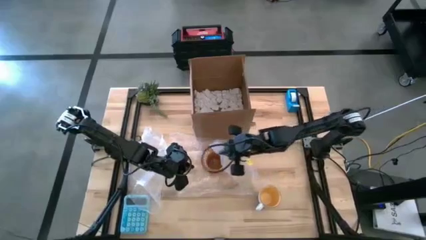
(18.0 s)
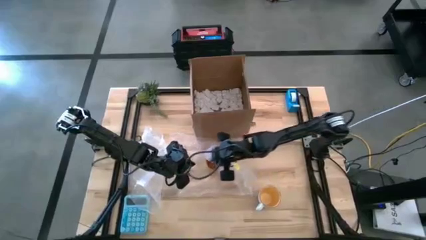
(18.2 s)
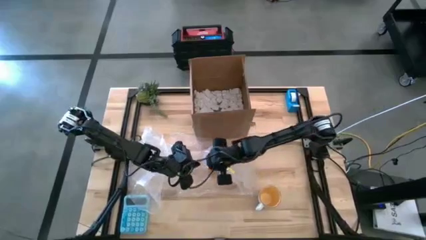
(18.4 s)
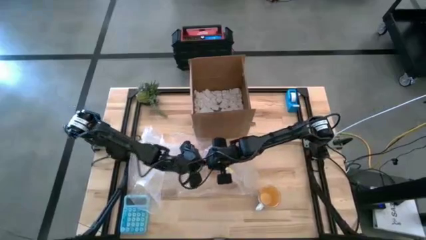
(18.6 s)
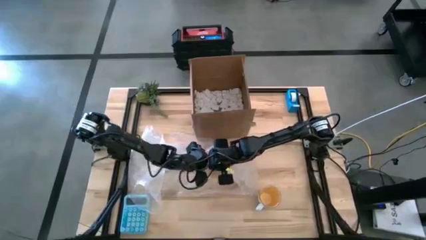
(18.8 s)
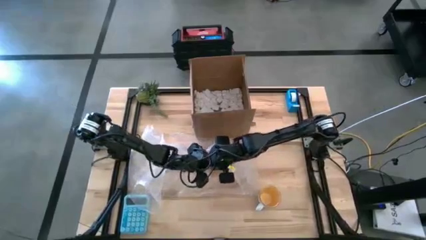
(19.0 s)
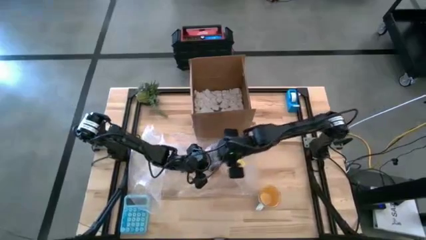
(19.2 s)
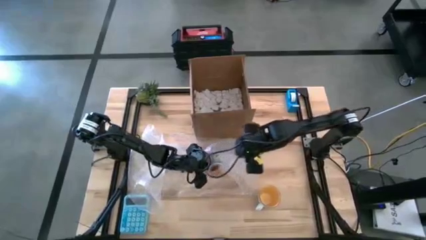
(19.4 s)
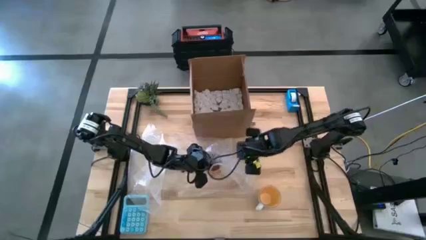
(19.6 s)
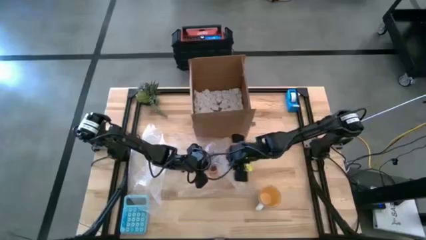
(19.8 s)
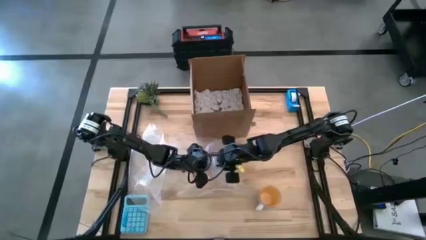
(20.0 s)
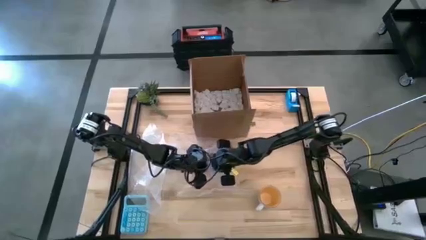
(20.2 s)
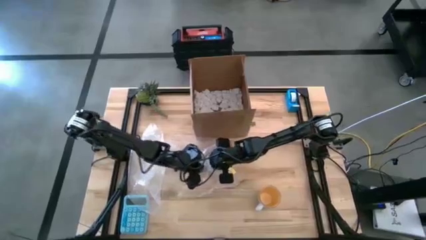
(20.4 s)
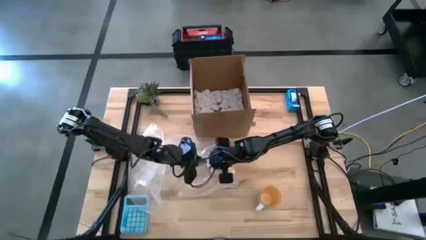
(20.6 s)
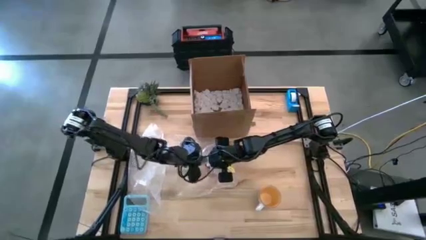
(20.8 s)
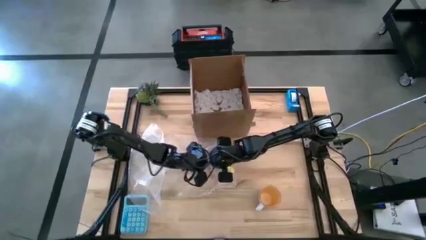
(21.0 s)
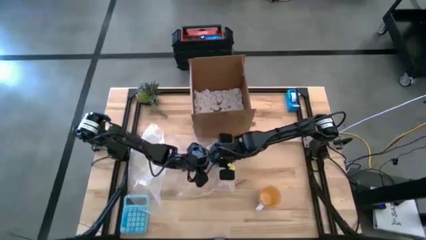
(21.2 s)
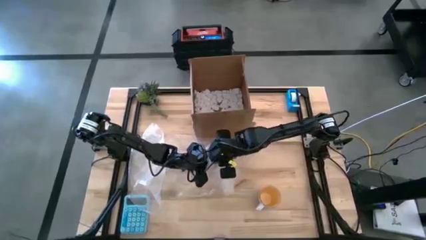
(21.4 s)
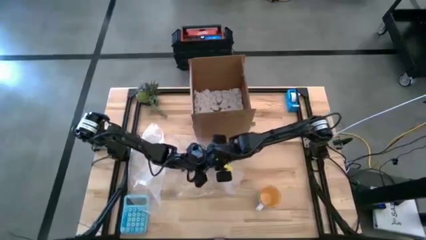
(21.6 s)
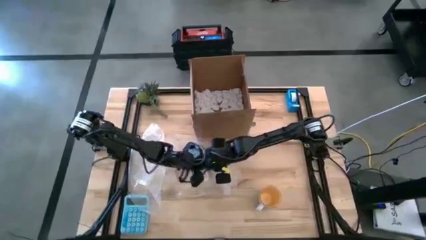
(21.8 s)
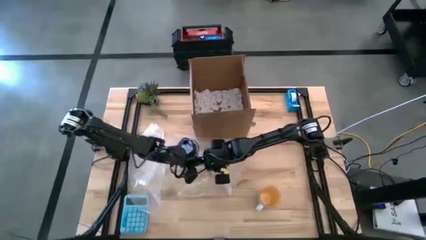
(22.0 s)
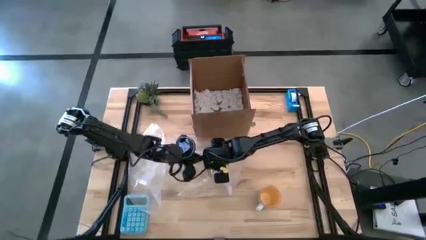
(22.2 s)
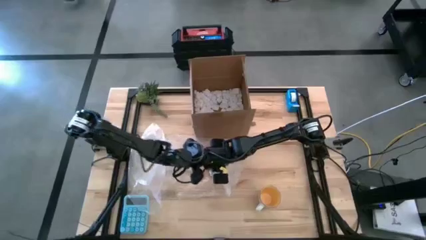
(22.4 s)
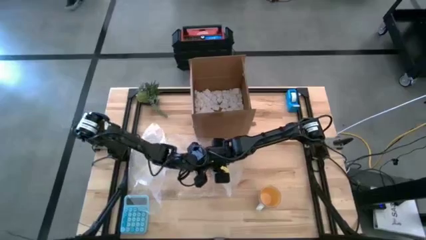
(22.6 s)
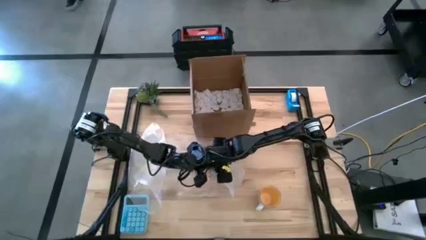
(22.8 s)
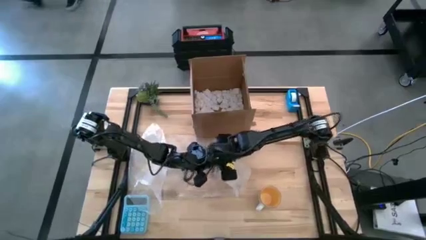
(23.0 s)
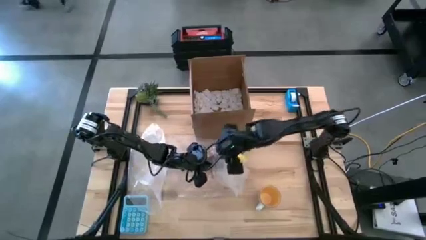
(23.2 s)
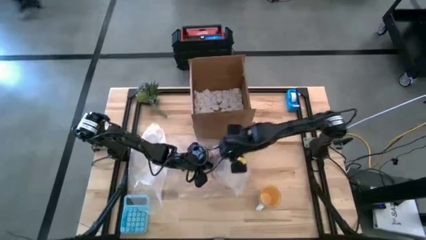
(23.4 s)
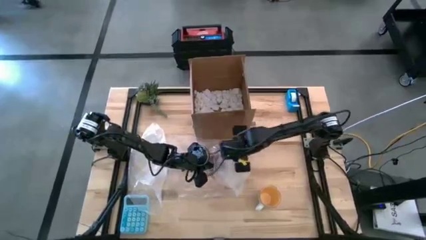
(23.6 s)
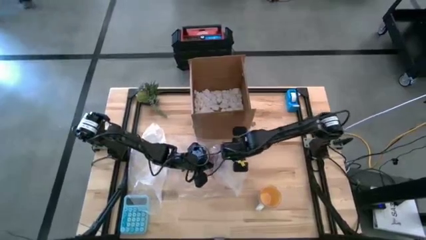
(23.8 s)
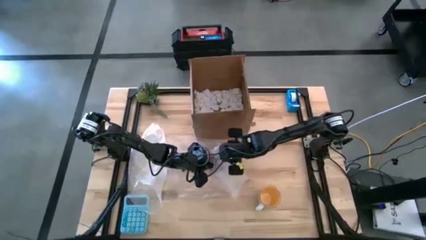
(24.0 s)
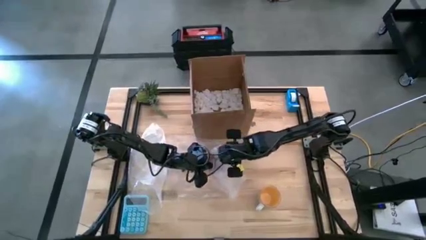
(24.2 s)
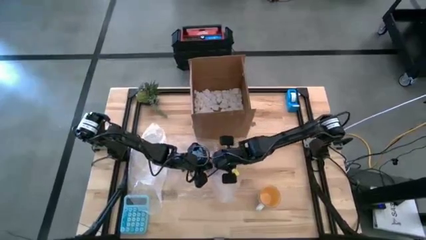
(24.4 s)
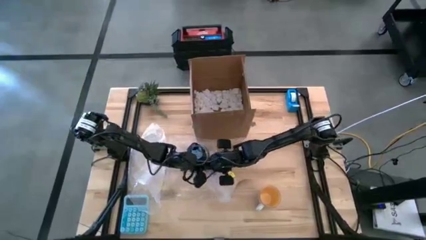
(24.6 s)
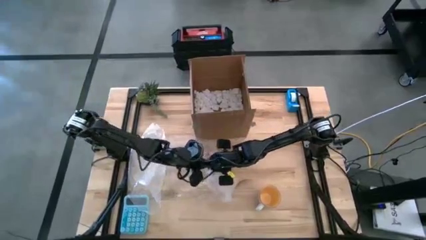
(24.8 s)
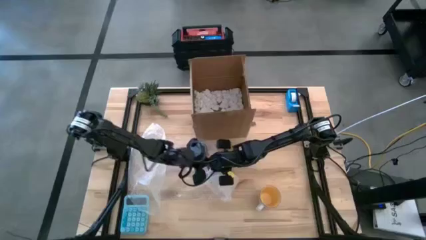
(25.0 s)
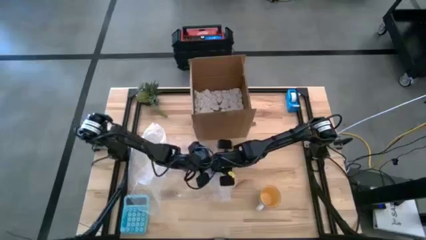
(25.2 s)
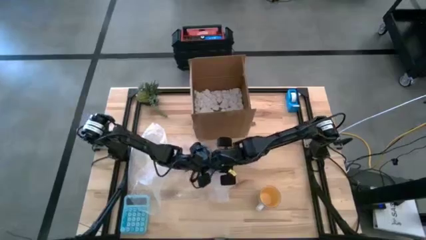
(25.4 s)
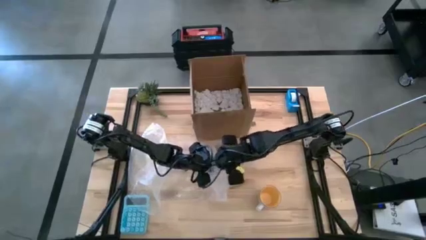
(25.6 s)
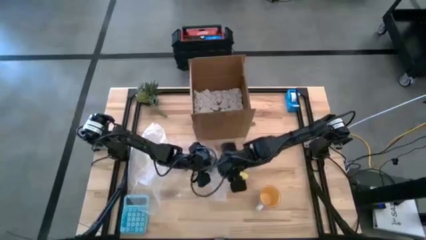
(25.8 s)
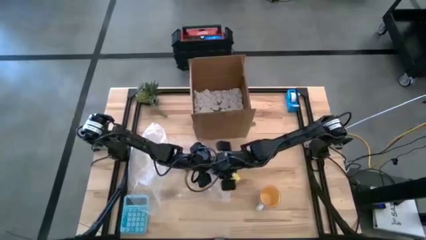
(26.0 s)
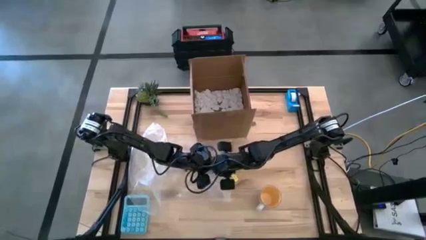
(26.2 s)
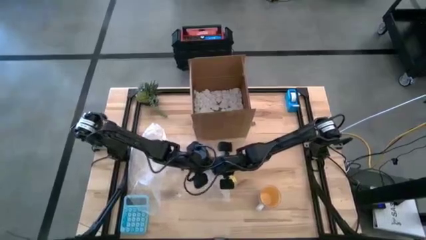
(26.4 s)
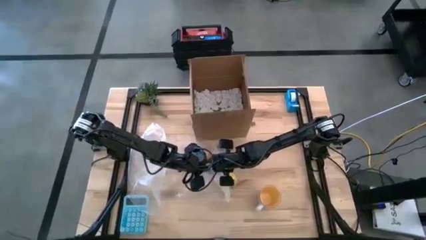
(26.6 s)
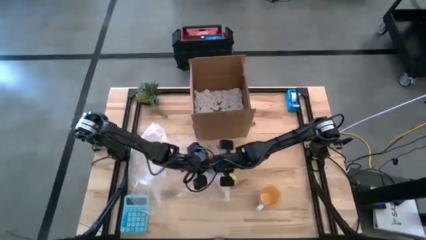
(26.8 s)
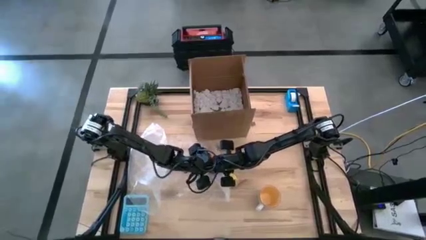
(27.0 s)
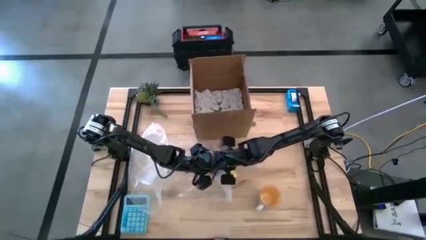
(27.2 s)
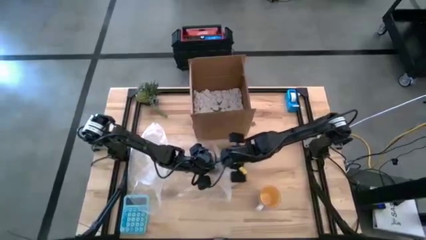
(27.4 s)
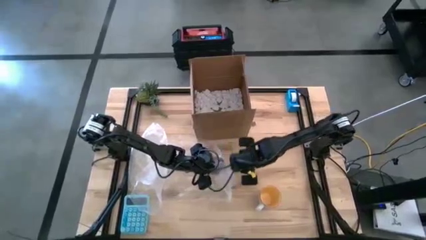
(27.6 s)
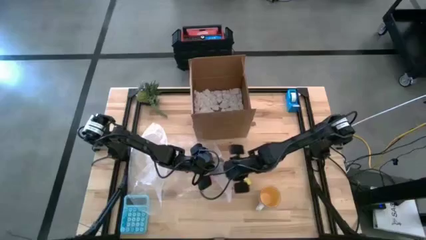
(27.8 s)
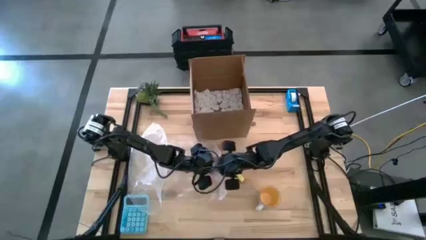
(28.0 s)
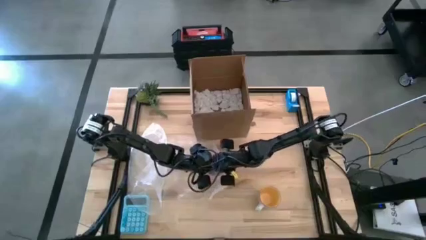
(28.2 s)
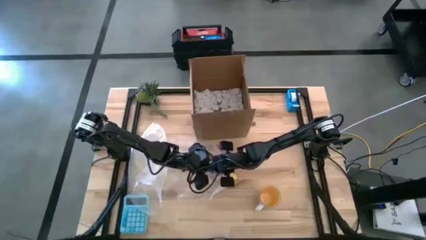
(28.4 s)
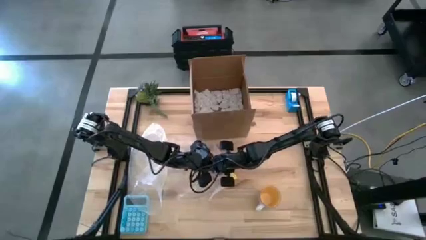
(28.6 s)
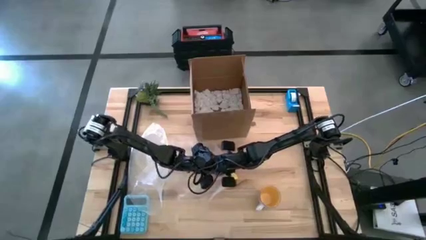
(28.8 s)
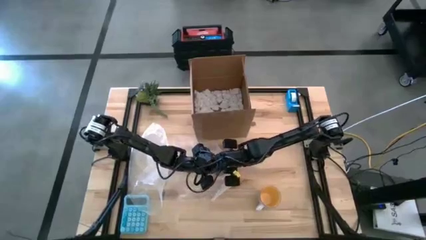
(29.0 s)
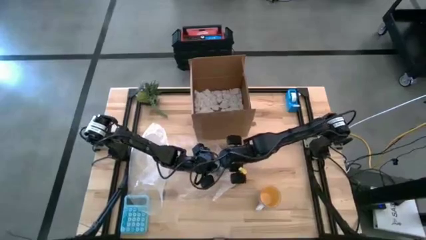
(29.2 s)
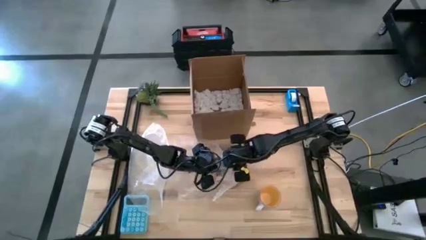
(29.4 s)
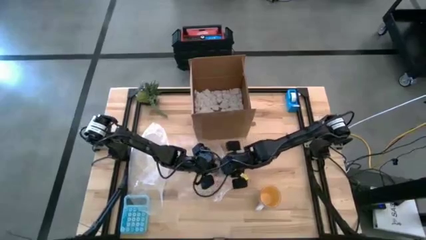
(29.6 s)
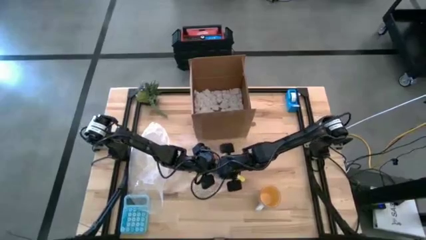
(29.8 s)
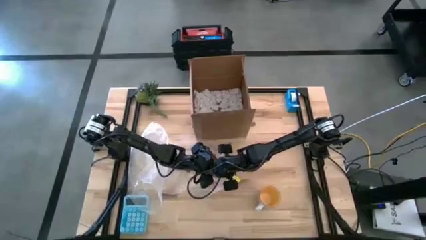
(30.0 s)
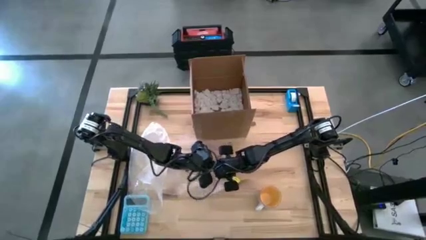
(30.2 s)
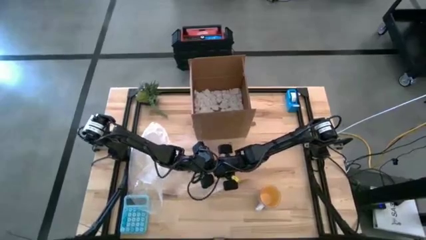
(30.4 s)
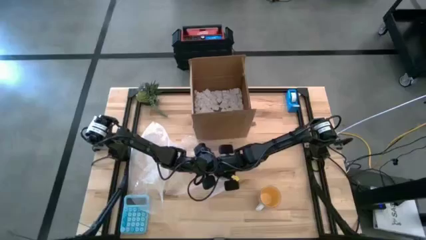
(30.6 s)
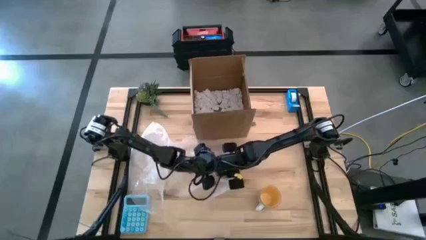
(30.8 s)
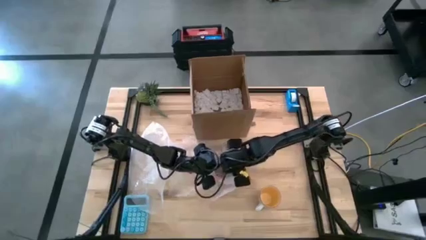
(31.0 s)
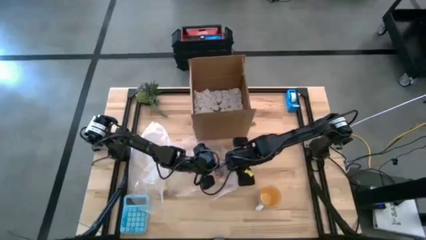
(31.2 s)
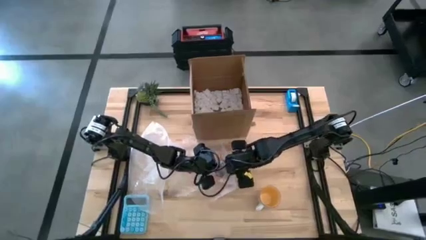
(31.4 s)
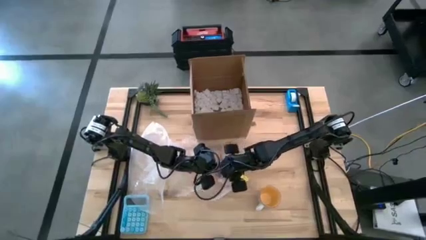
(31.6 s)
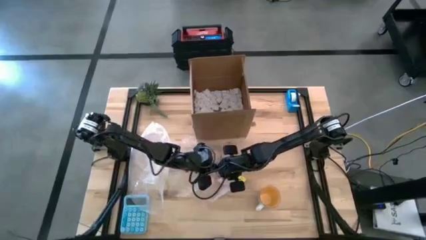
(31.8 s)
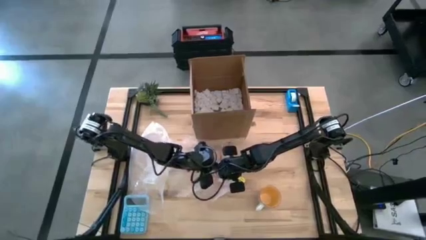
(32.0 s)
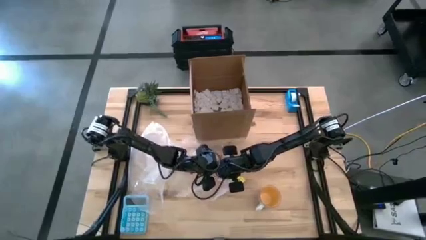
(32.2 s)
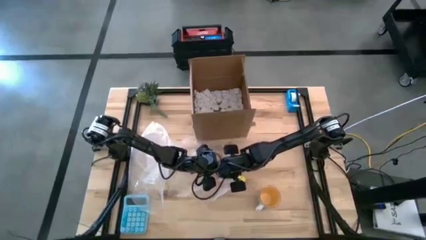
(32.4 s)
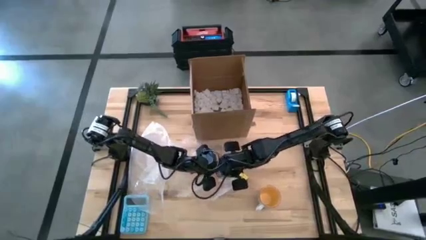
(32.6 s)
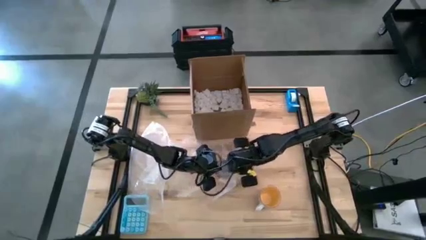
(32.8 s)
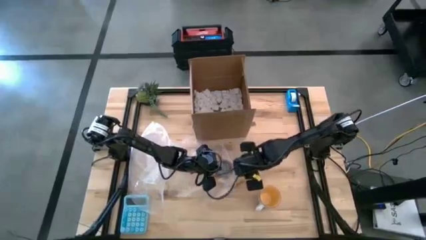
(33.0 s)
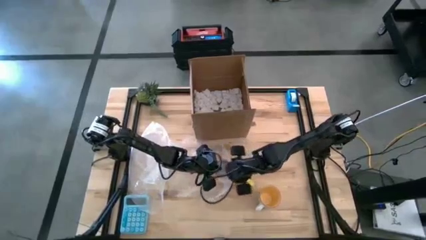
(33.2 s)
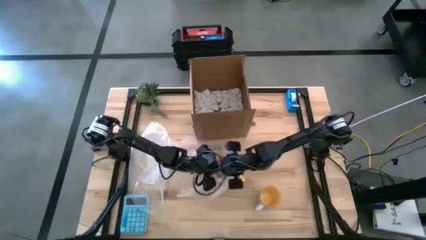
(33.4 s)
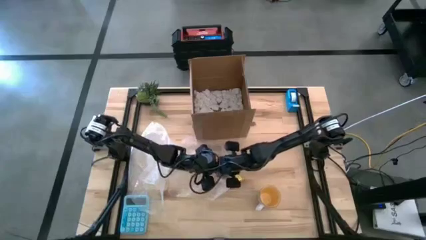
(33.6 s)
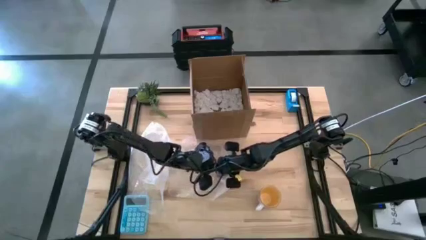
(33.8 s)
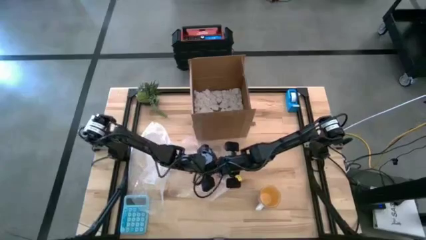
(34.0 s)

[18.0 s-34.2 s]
Task: wrap mug
Wrap the orange mug with bubble wrap
